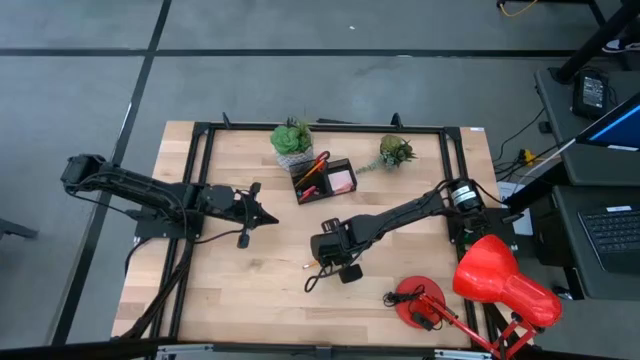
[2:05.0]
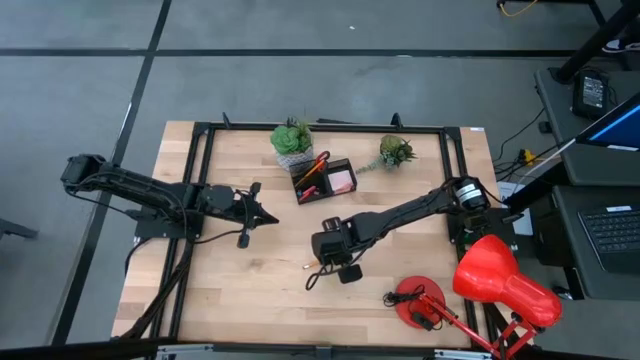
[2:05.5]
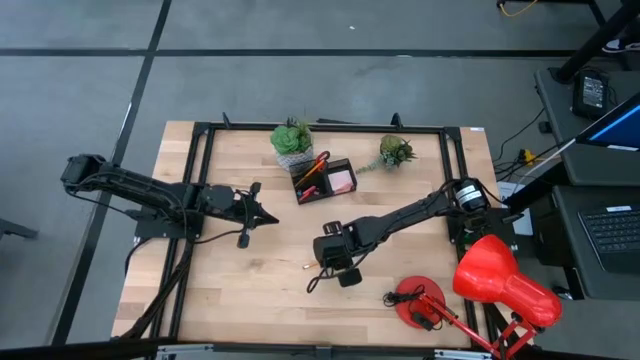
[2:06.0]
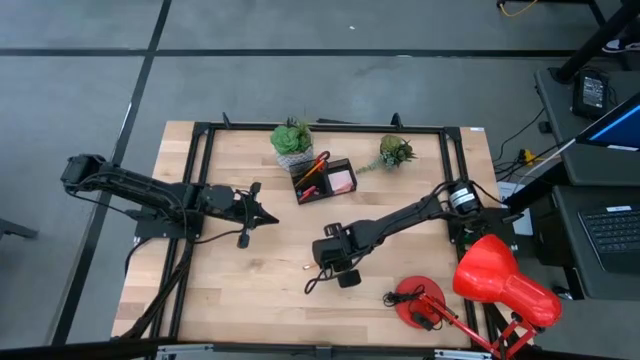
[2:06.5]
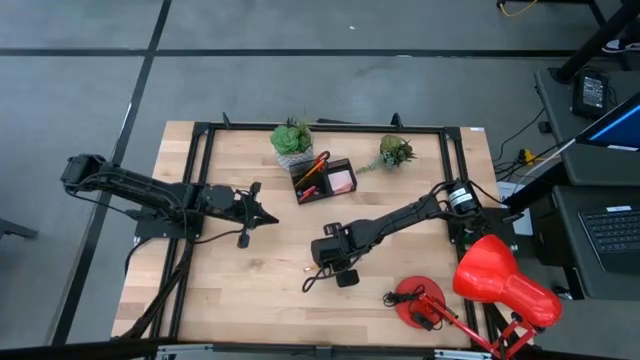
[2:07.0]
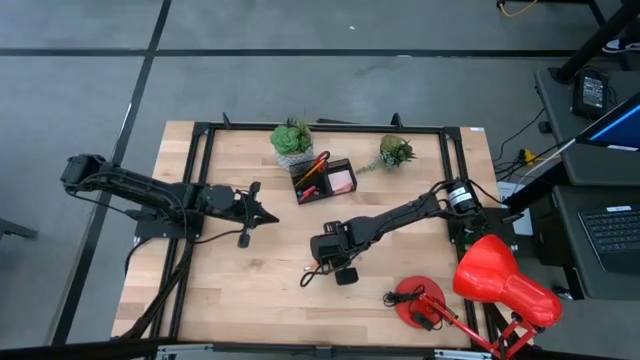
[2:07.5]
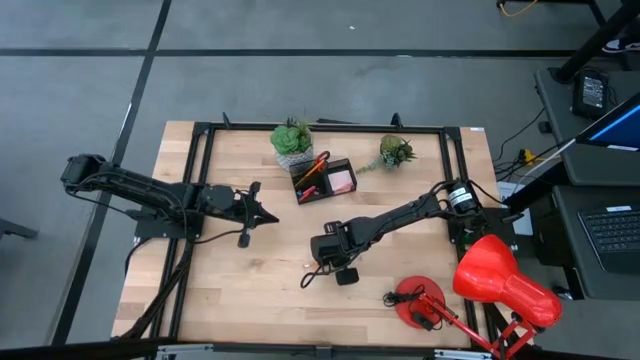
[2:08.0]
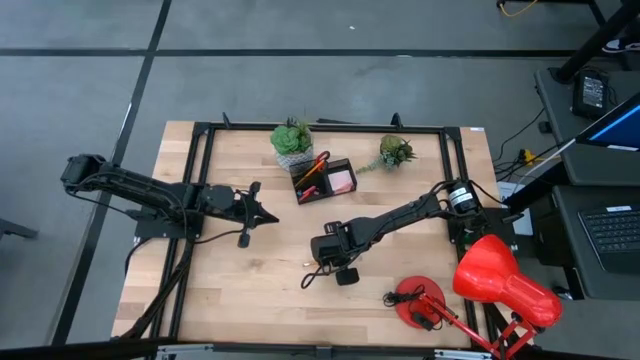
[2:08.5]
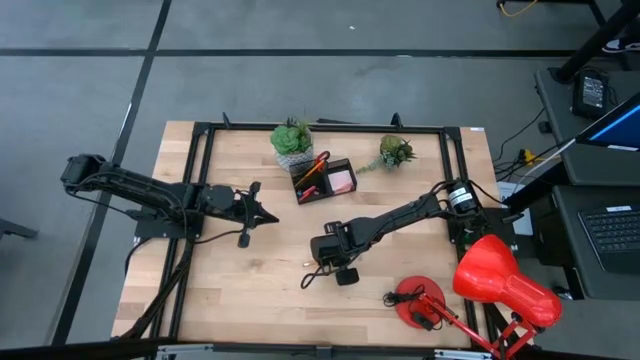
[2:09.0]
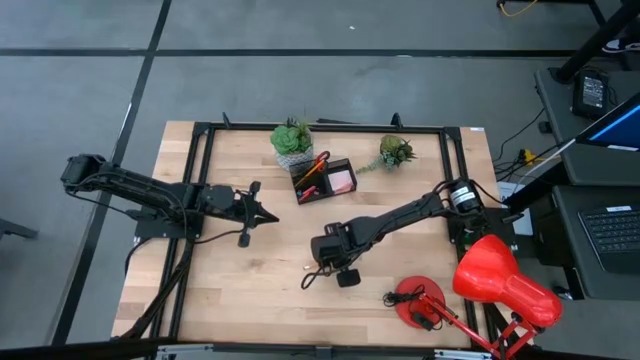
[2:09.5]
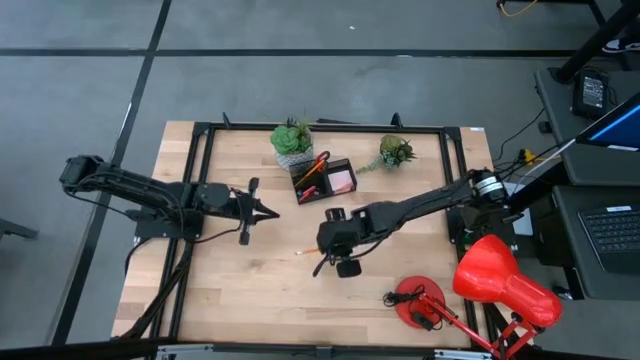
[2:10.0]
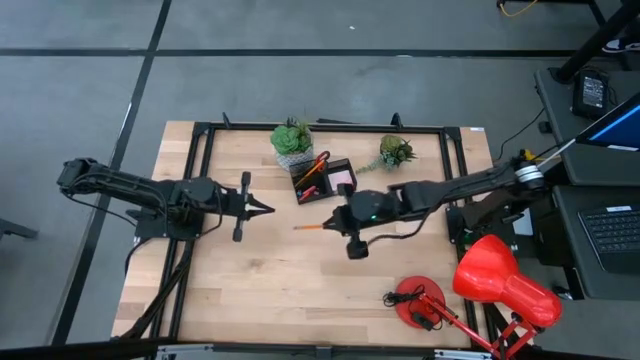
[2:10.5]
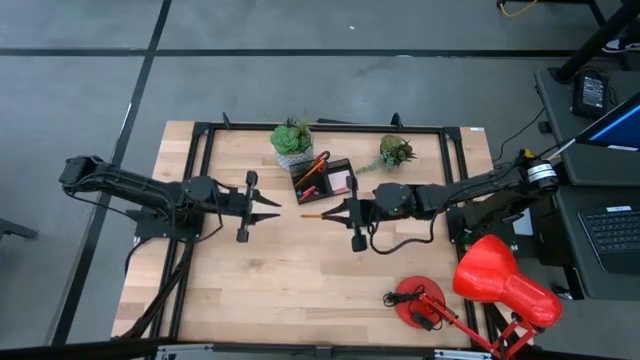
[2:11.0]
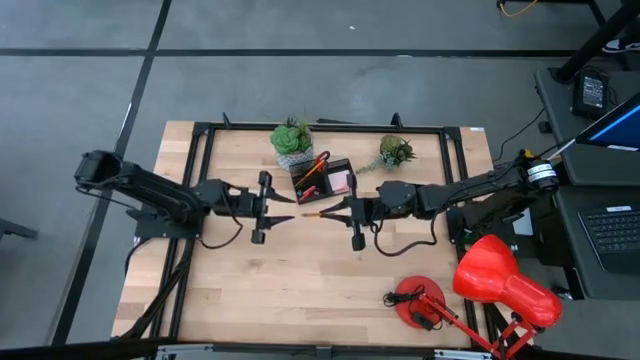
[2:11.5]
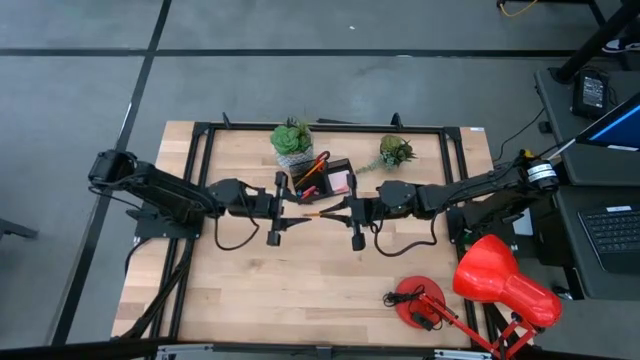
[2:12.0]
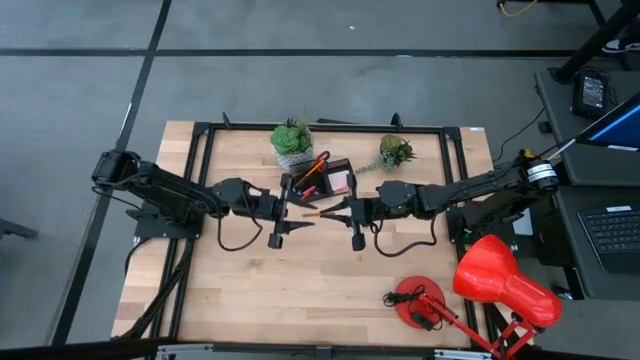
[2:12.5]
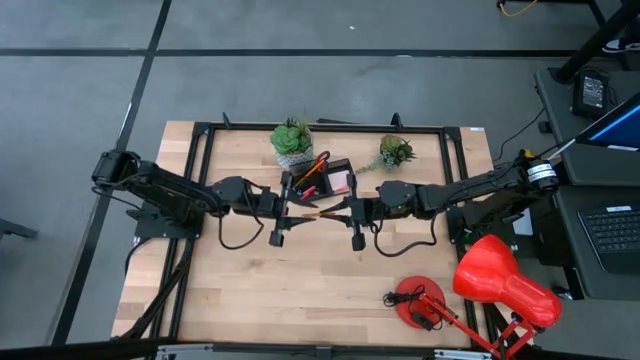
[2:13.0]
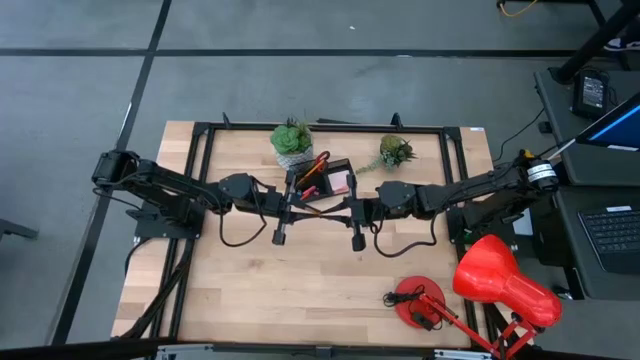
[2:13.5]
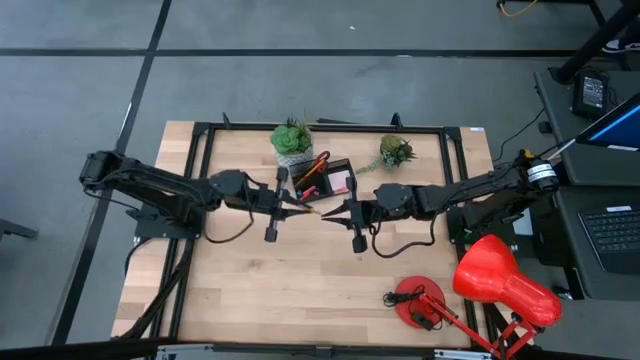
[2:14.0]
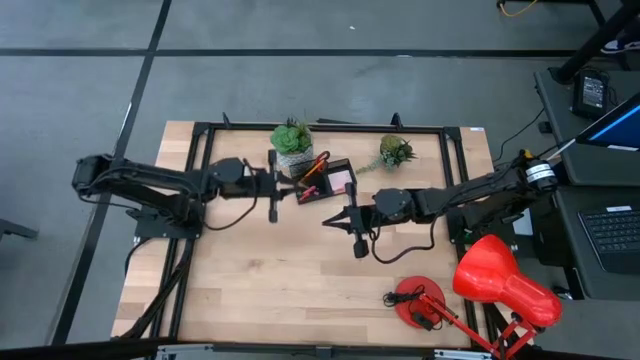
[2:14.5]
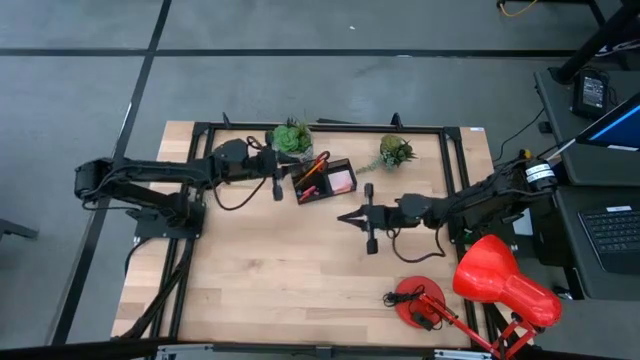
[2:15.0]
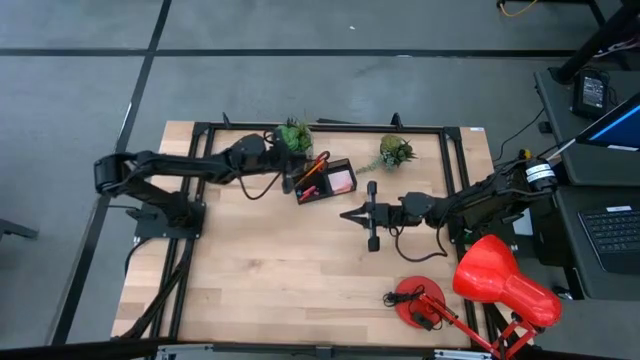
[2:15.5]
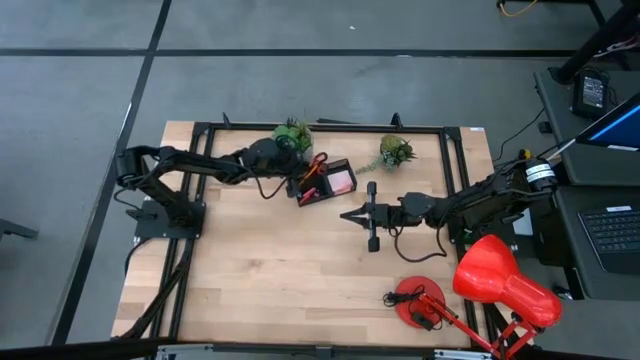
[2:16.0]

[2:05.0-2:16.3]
Task: Pick and place office supplies into organizer
Put the orange pencil into the black desk organizer

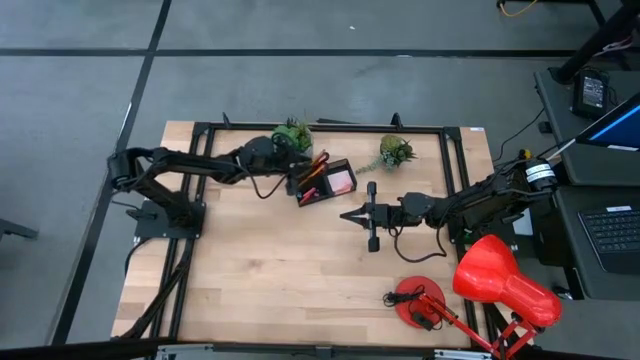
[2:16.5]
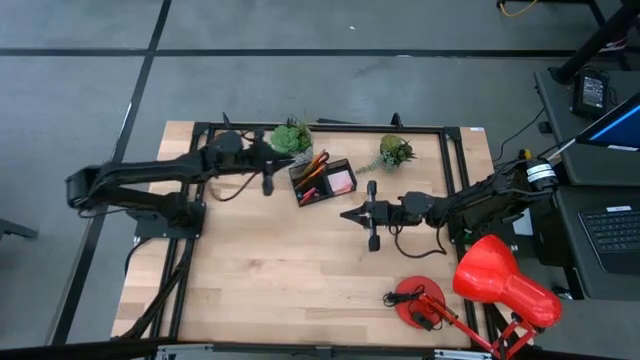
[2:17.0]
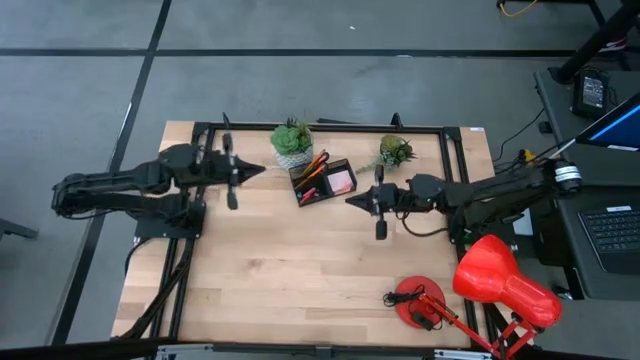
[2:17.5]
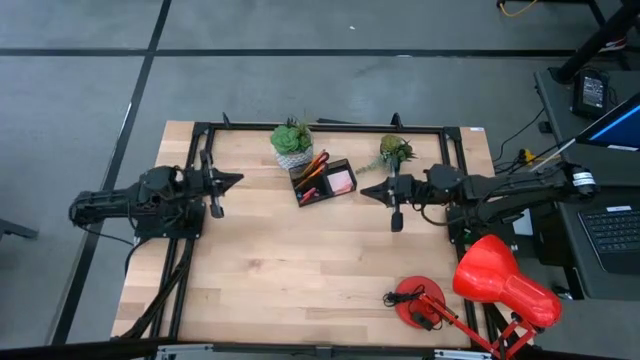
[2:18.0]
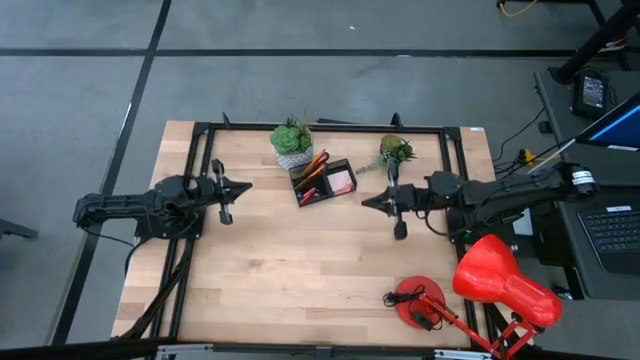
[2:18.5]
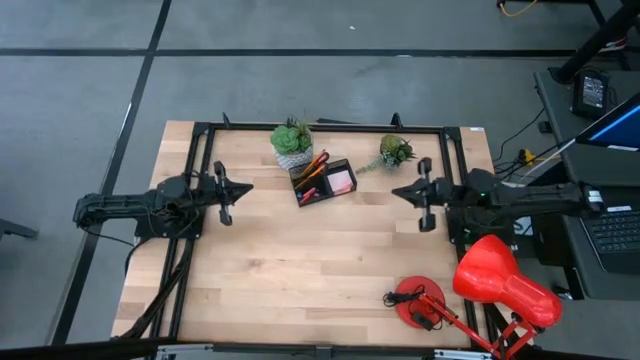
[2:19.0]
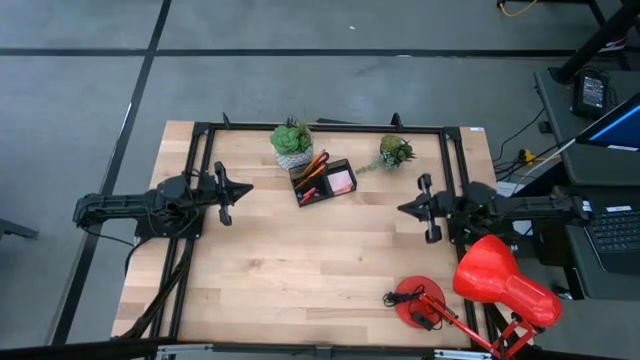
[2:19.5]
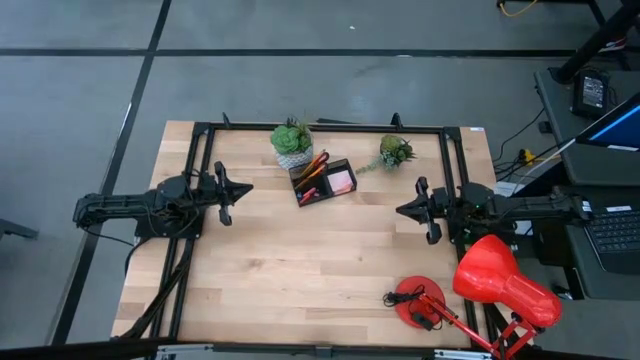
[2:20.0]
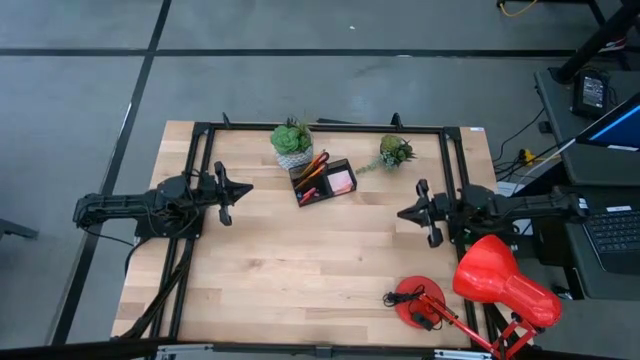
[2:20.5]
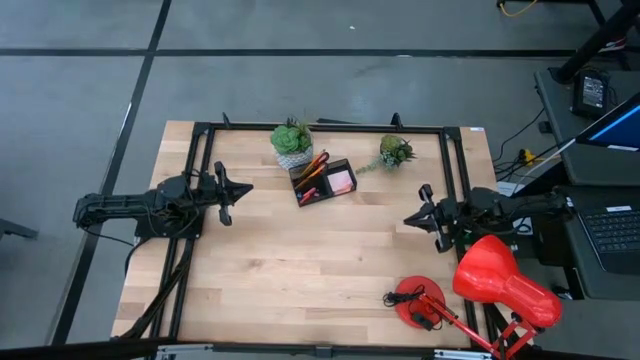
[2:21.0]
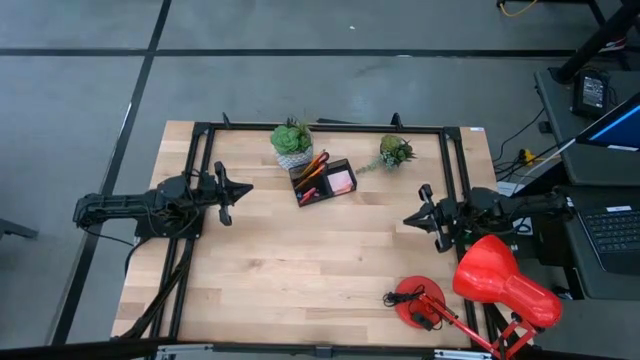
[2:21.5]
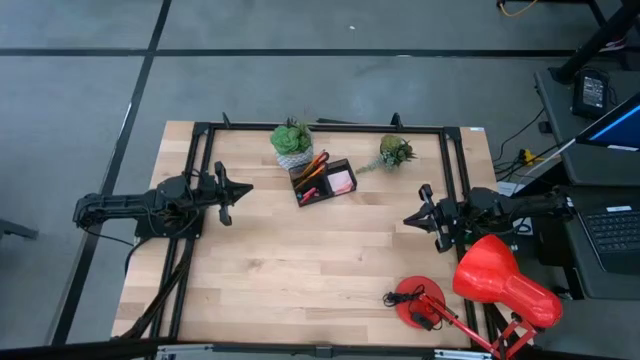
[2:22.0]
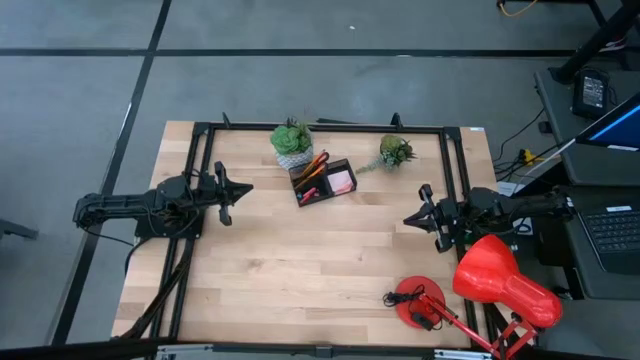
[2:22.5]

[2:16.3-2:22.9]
Return to Home Position

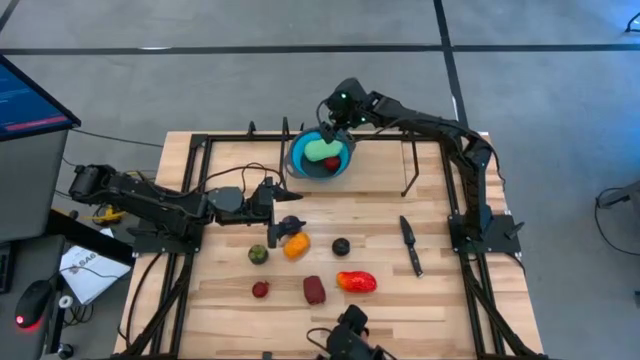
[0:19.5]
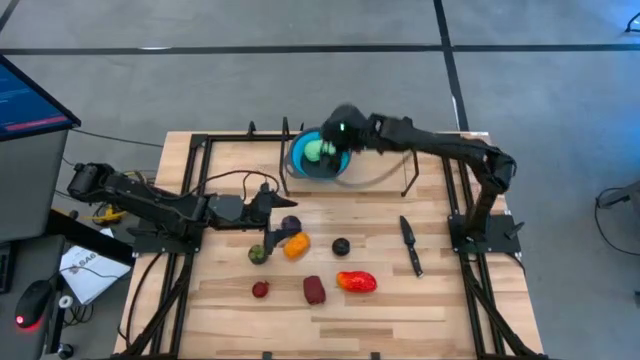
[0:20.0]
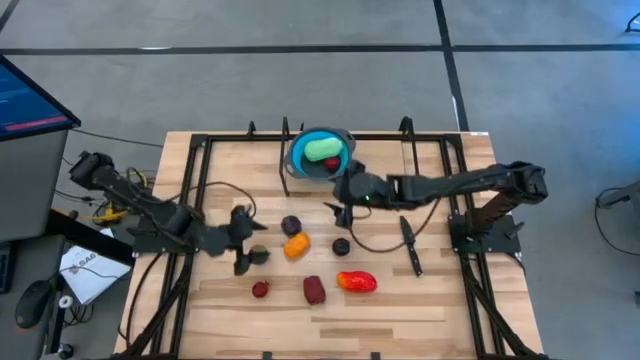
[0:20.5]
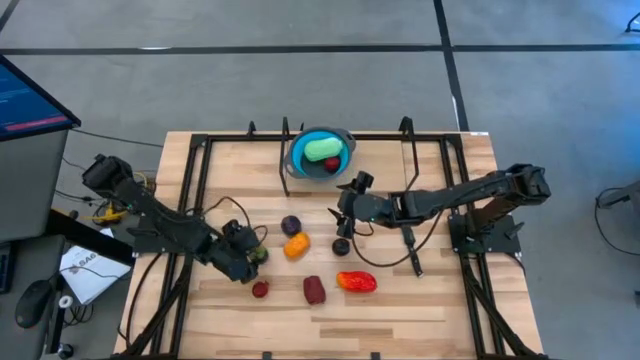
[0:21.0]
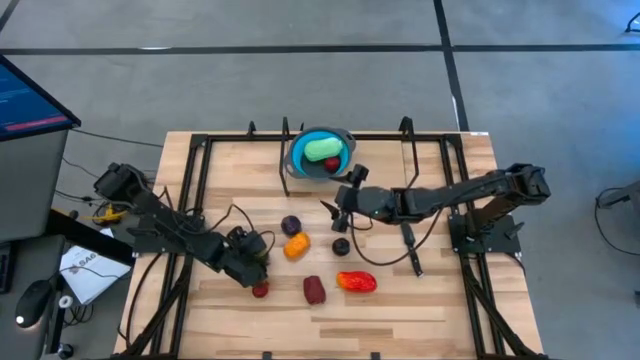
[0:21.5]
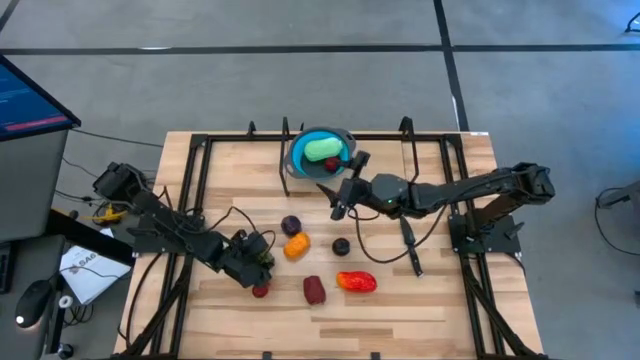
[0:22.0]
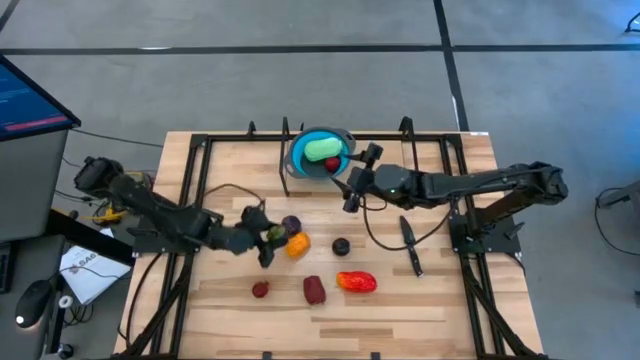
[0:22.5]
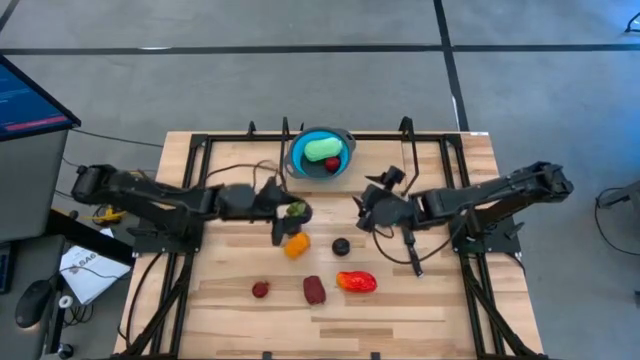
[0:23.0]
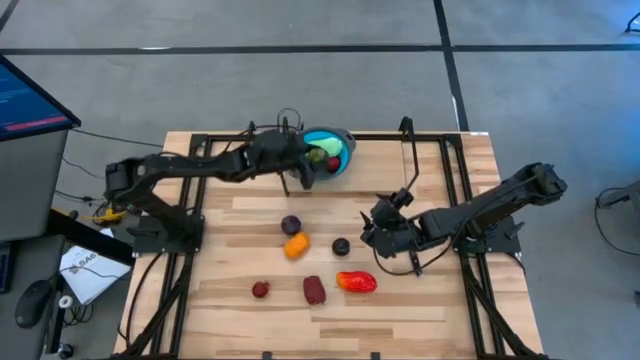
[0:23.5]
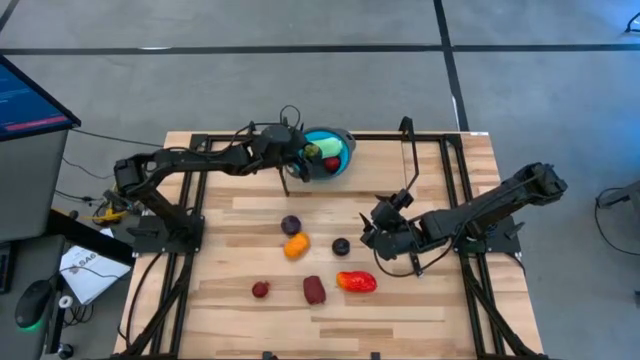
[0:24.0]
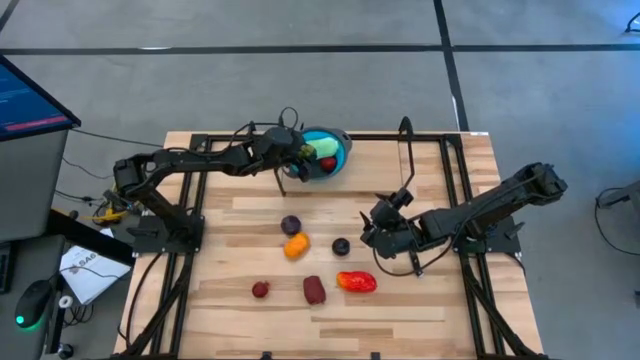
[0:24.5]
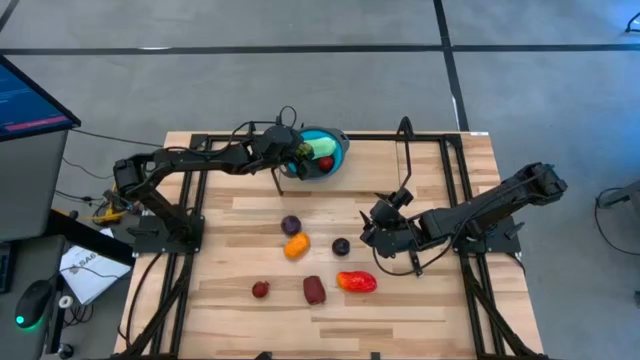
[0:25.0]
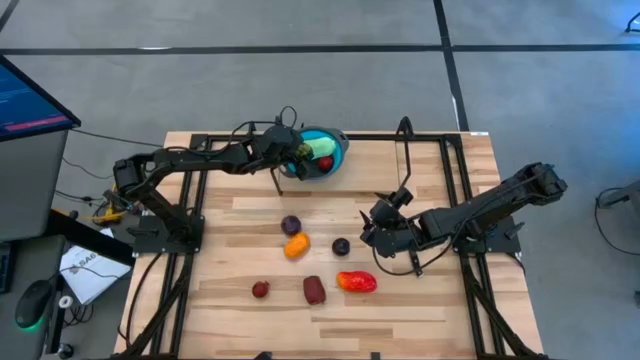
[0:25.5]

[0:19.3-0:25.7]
Task: Pick & Place Fruit
Put the purple mangosteen into the blue strainer bowl on the shelf
